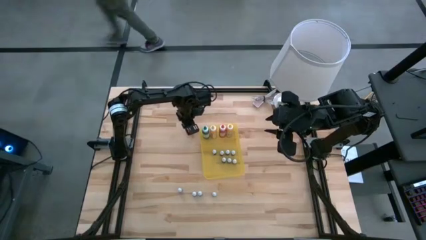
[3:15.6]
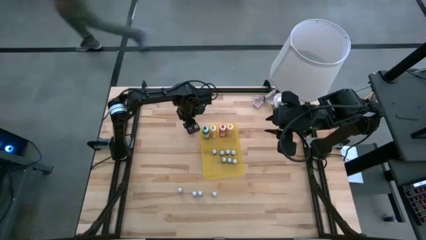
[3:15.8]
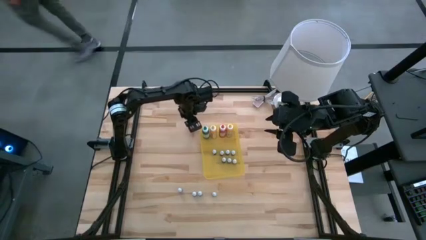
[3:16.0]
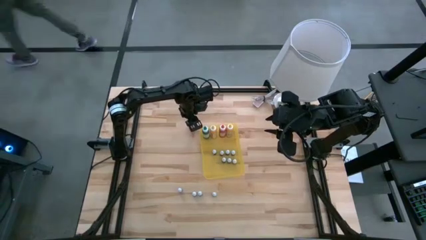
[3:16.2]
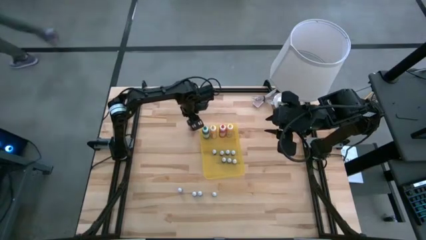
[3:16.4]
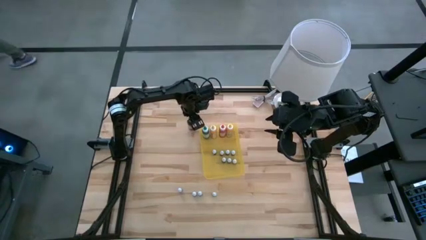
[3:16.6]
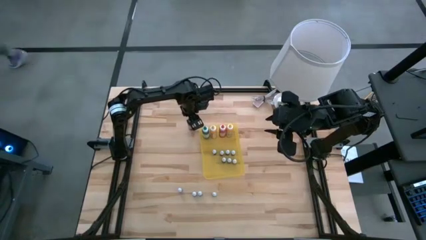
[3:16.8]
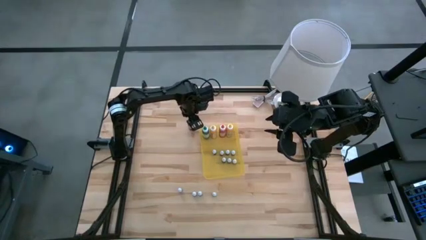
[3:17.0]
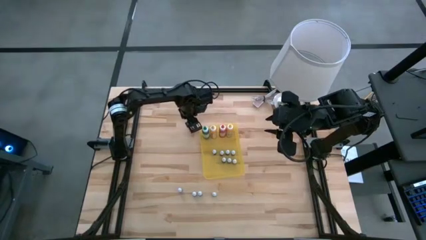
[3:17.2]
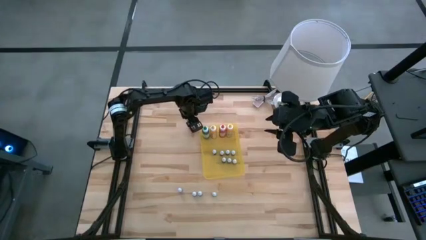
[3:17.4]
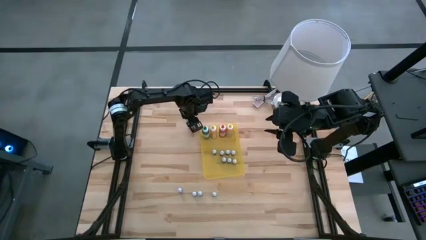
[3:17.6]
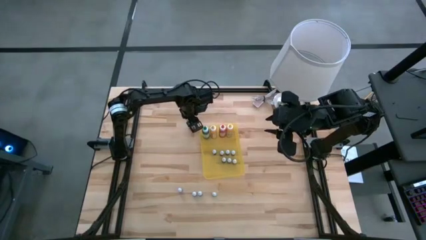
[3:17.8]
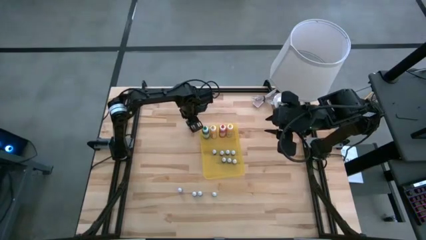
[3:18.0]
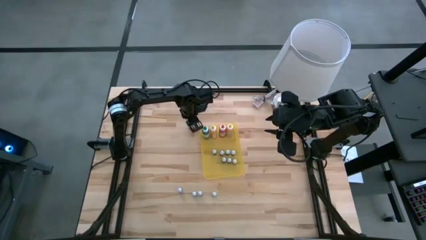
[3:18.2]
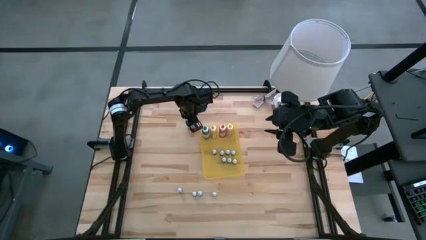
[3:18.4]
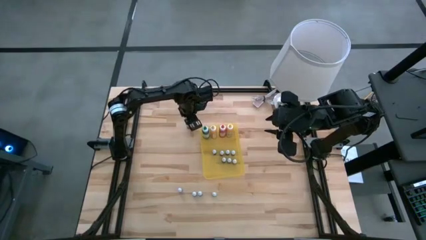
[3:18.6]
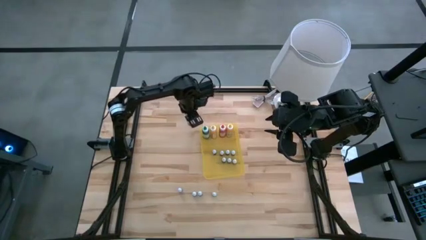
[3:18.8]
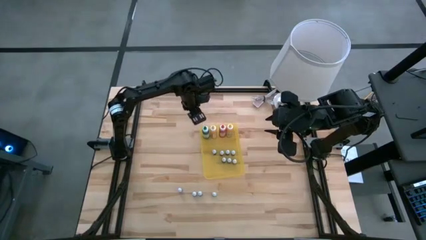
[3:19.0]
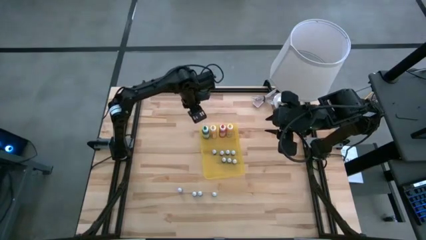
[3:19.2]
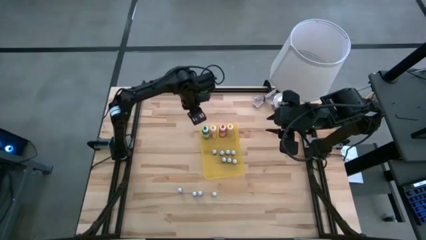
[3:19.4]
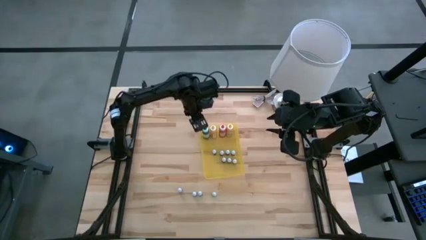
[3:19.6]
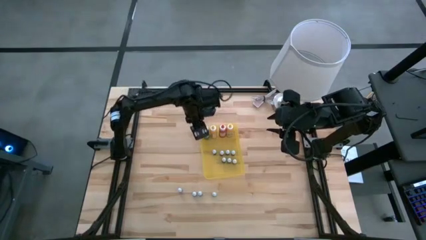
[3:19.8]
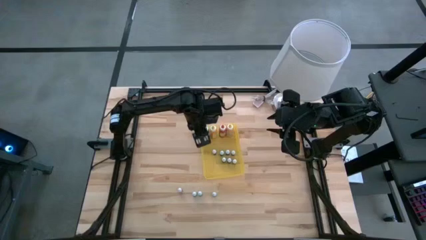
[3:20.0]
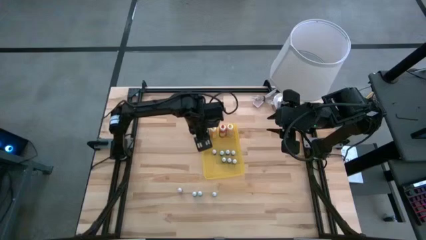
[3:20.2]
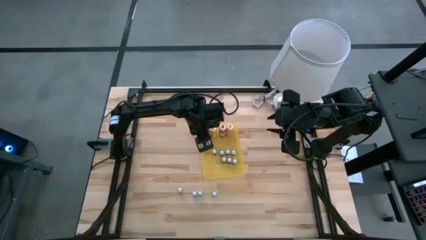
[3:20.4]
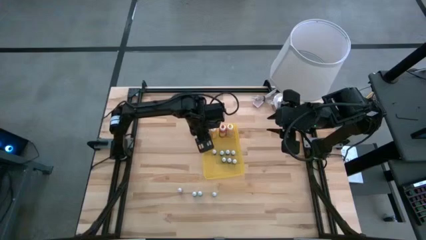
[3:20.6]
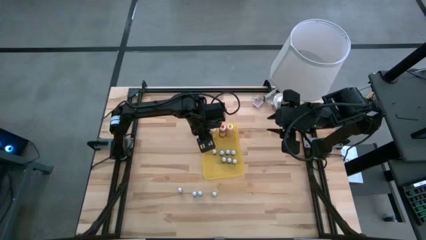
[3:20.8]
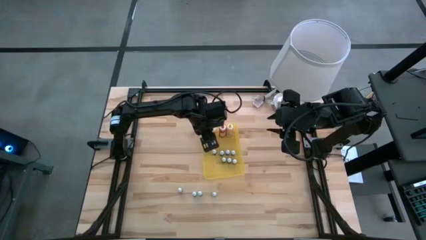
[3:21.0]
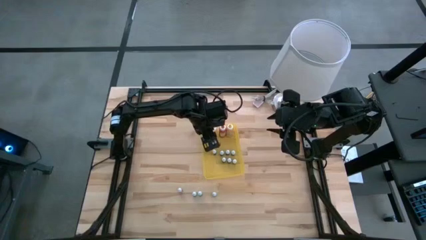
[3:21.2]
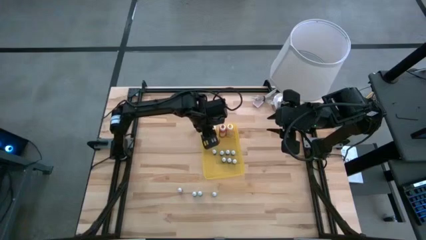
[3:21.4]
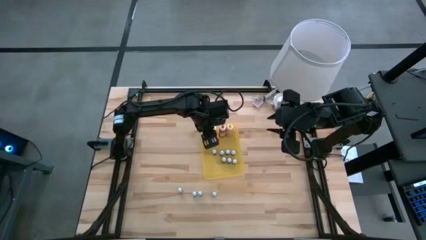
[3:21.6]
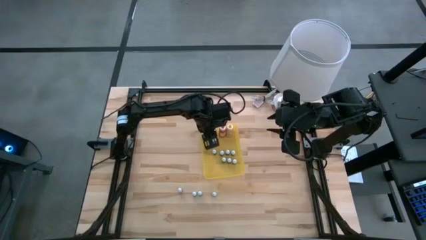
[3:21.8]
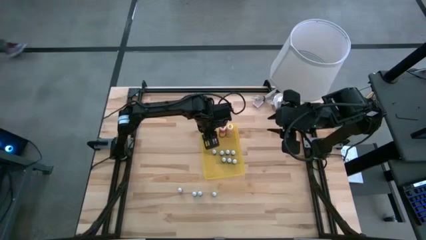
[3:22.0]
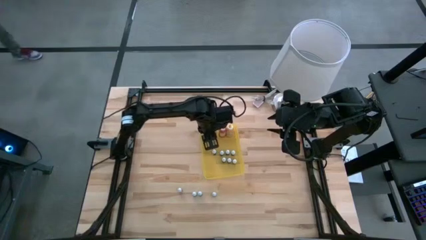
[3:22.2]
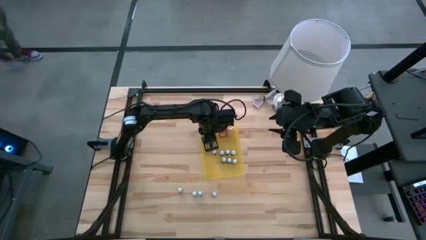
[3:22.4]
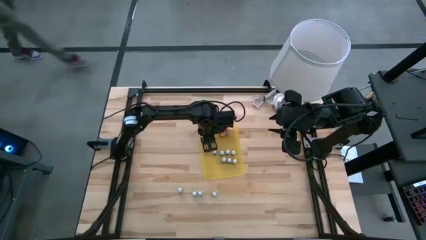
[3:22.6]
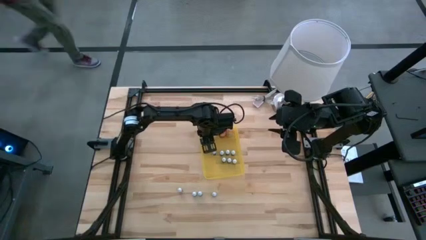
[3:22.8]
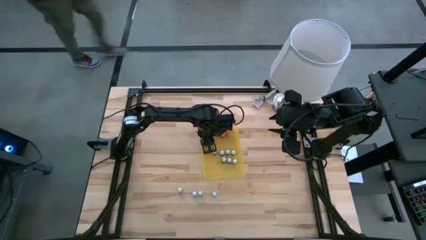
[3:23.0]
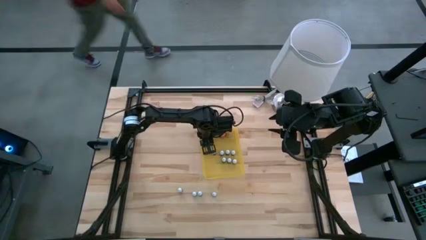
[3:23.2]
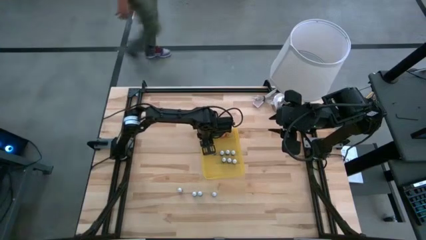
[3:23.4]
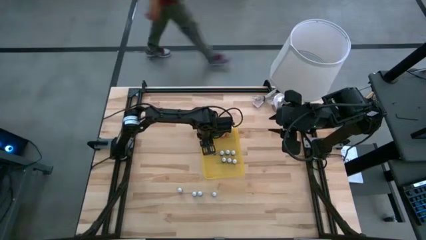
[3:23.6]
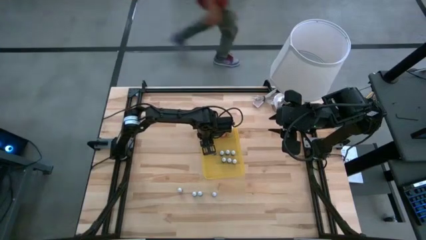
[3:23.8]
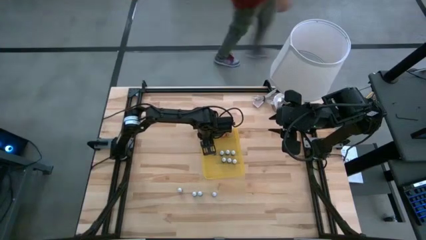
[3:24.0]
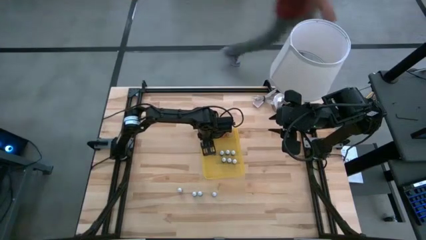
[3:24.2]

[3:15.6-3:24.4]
Task: Pick & Place food coloring
Put the large red food coloring bottle into the bin

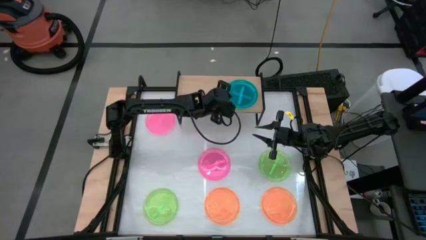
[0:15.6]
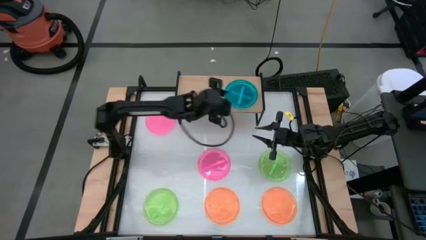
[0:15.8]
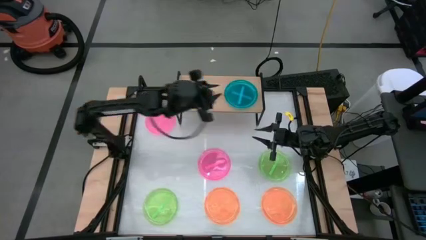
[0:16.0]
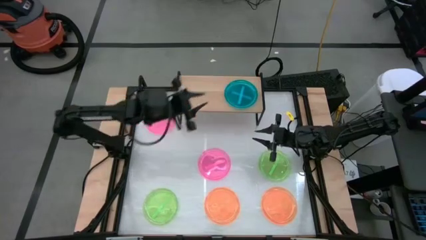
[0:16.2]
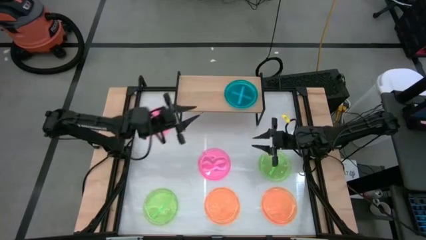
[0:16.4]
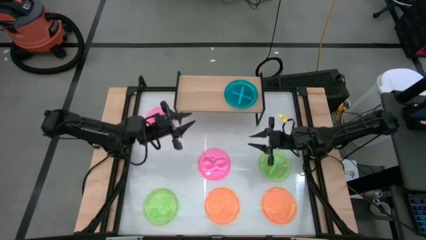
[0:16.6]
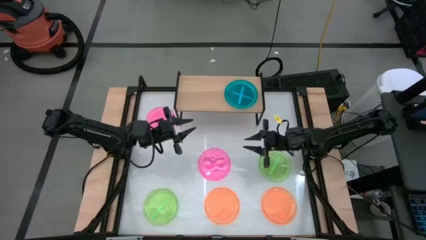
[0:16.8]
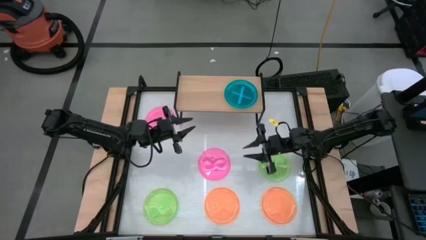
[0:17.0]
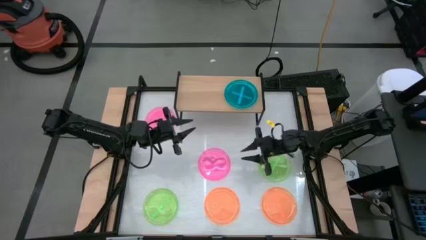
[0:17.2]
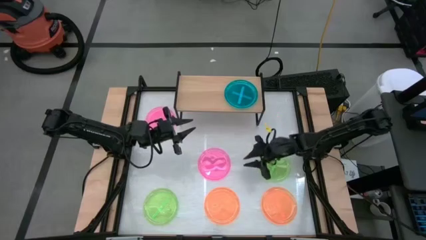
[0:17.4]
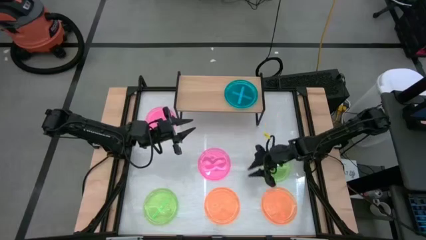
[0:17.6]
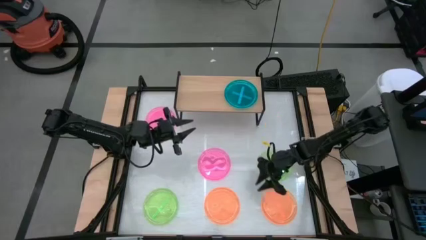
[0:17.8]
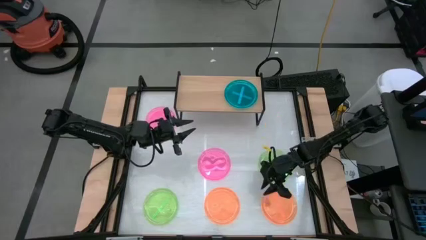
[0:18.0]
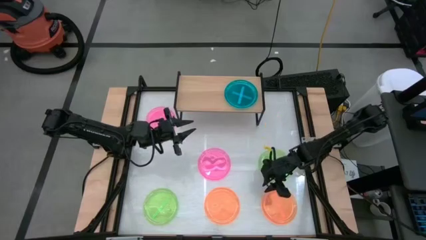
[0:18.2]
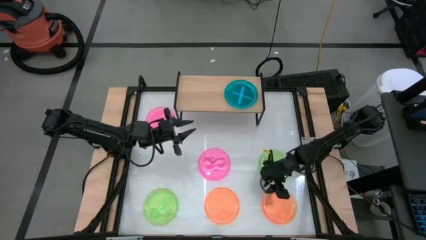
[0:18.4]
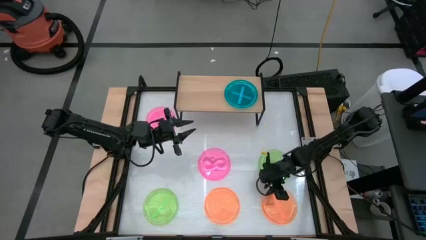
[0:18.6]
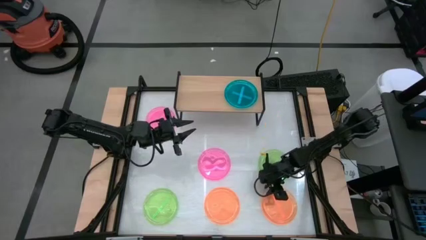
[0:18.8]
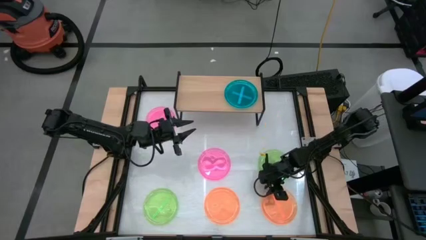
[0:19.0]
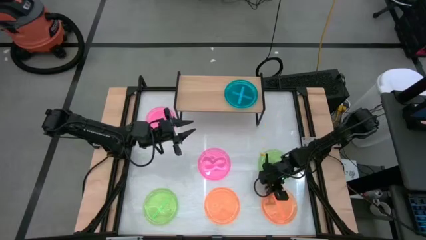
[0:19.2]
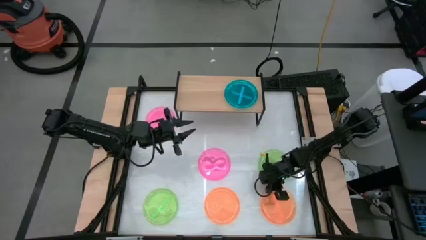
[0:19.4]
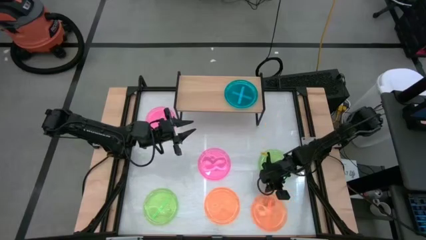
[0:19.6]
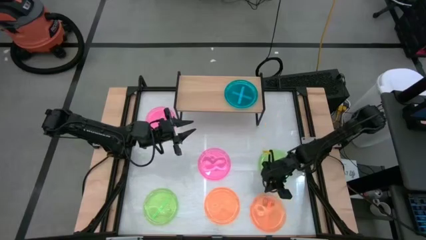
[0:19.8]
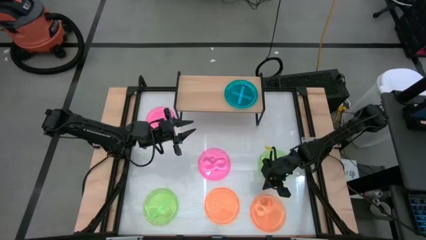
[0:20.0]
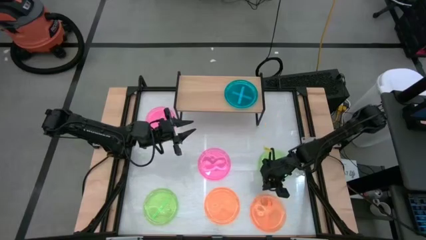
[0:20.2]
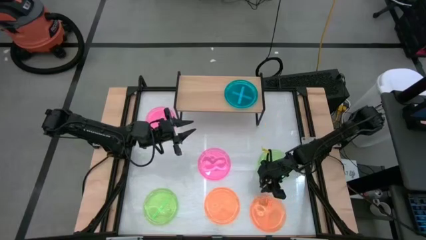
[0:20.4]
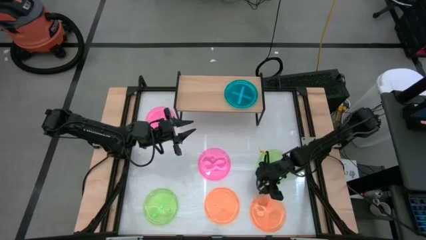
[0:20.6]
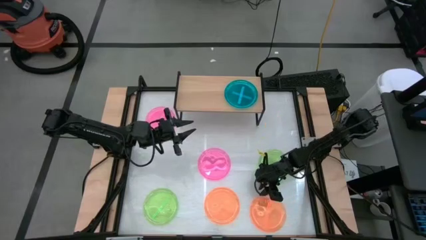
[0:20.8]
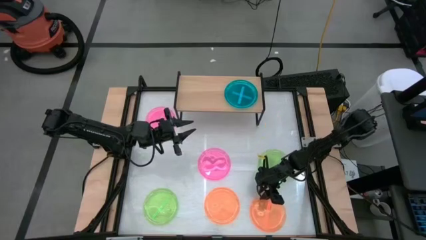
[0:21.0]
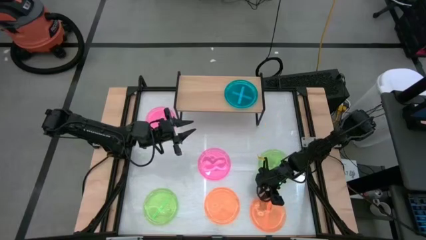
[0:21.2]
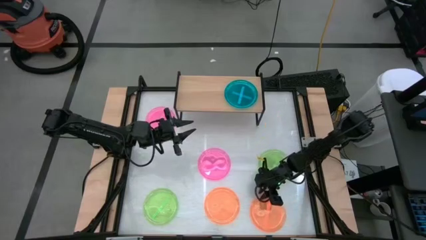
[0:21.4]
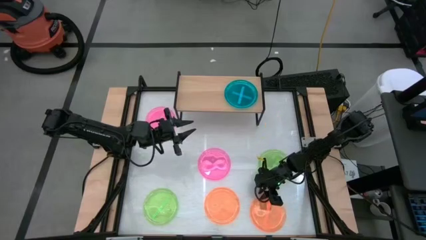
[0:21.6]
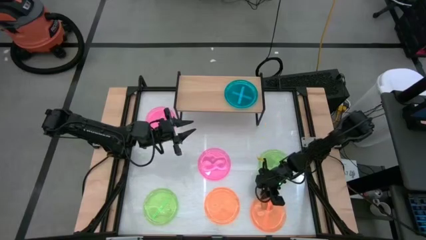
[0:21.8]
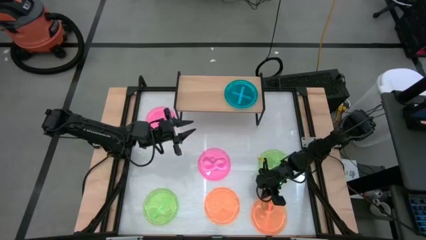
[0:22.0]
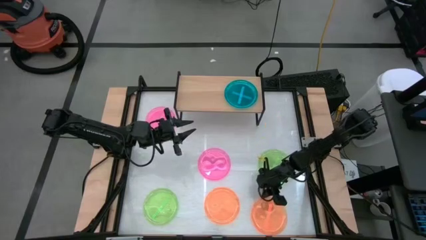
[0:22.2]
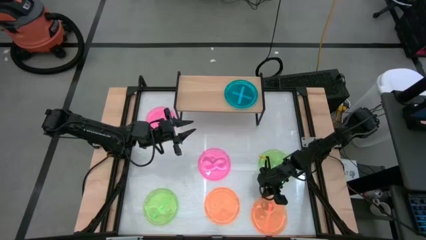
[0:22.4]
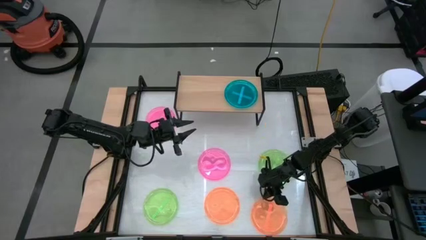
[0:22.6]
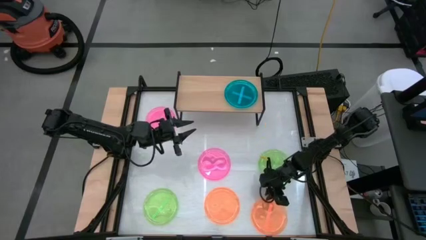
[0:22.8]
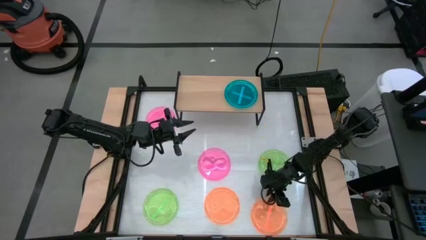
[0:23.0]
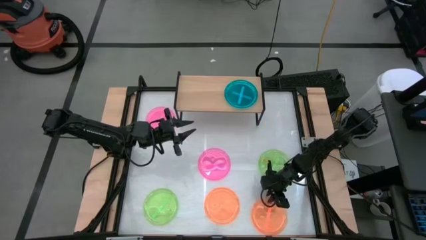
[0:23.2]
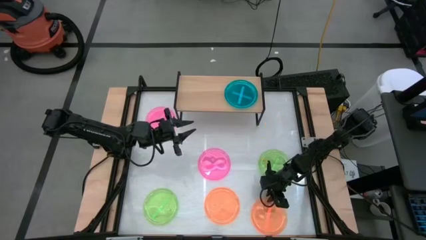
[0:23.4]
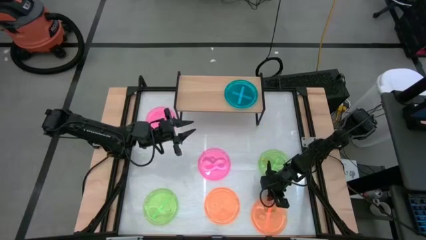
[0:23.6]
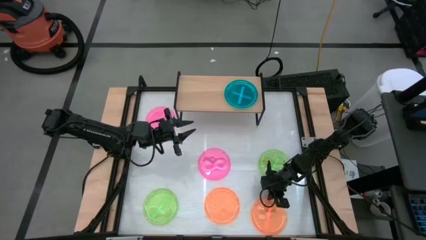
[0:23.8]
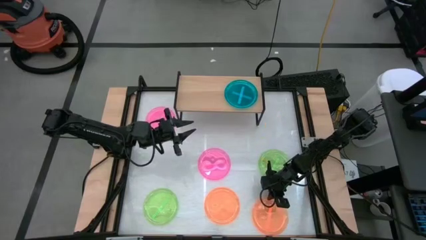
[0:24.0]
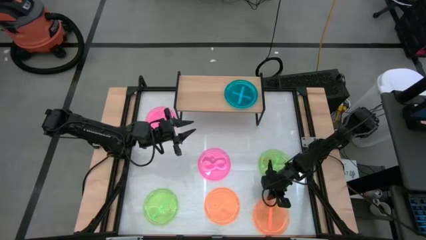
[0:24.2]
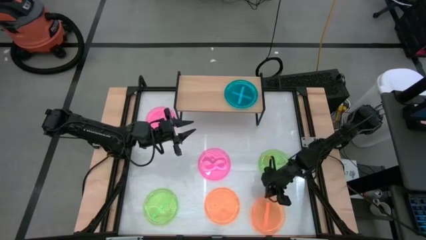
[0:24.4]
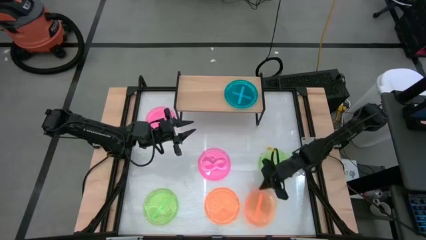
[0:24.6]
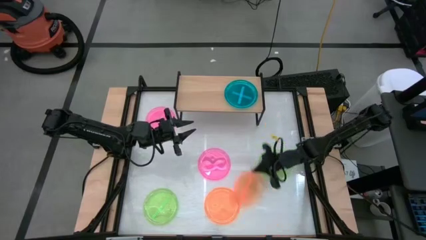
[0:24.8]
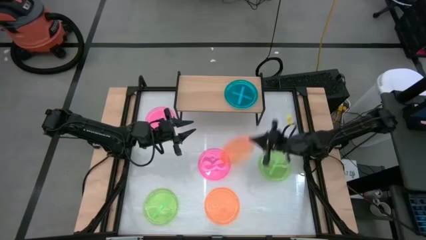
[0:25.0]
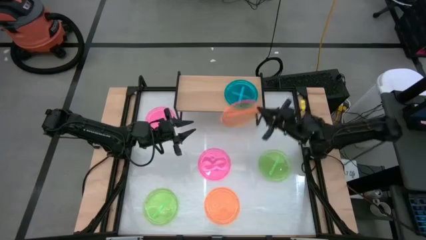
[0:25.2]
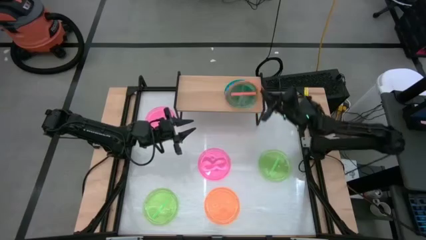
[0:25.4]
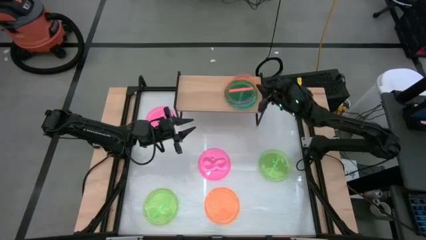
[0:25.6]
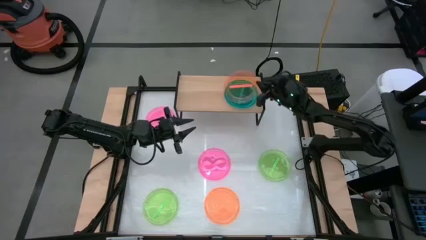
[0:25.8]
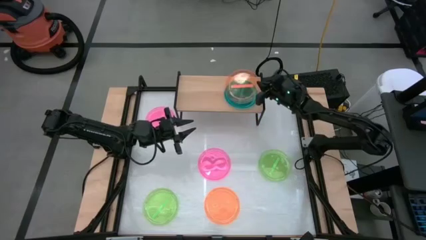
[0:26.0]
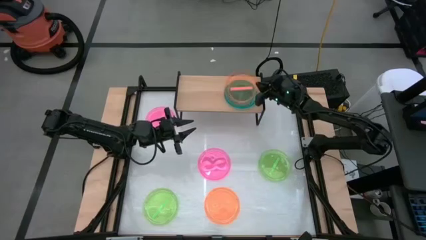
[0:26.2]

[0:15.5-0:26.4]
Task: Place and stack plates onto a shelf
Stack the right orange plate on the blue plate on the shelf
